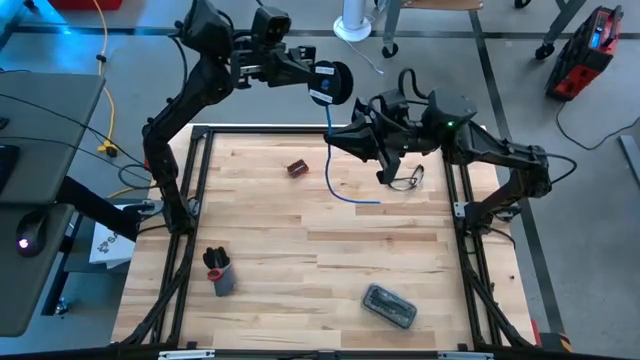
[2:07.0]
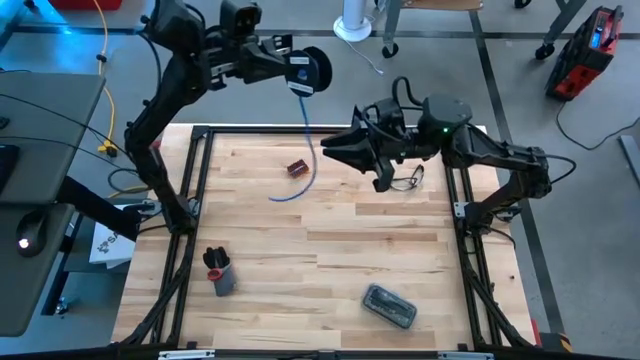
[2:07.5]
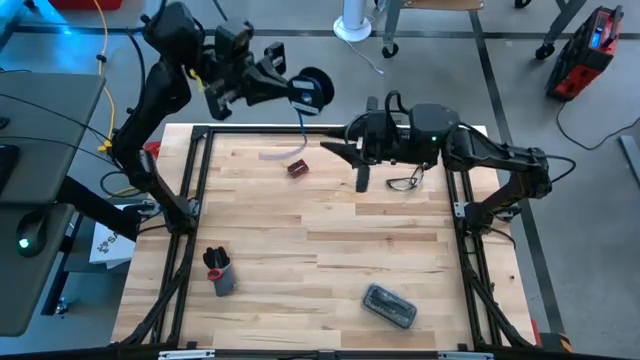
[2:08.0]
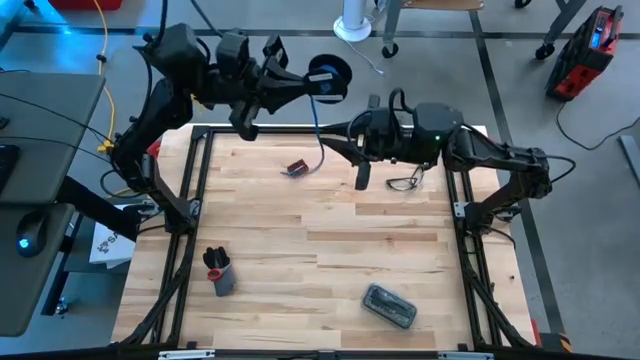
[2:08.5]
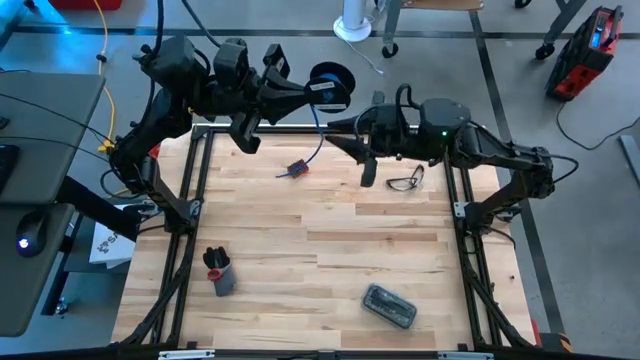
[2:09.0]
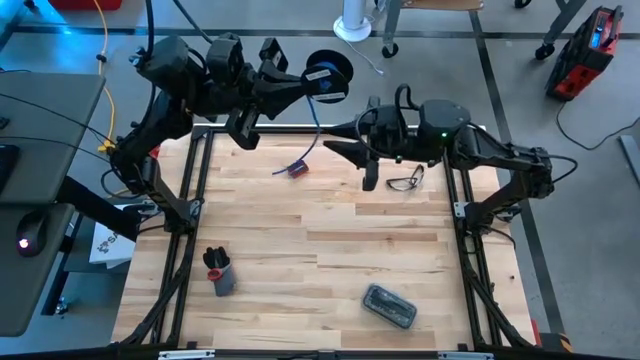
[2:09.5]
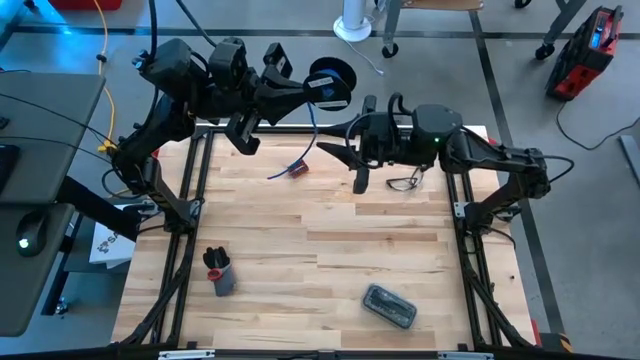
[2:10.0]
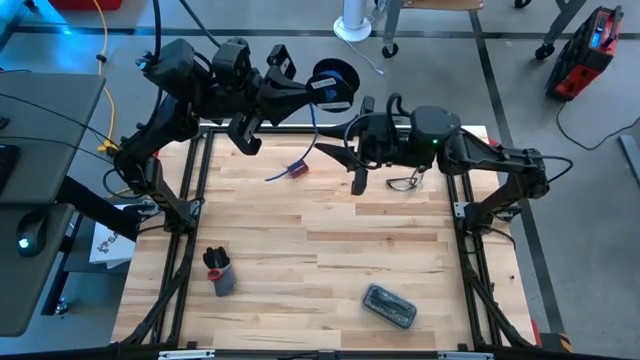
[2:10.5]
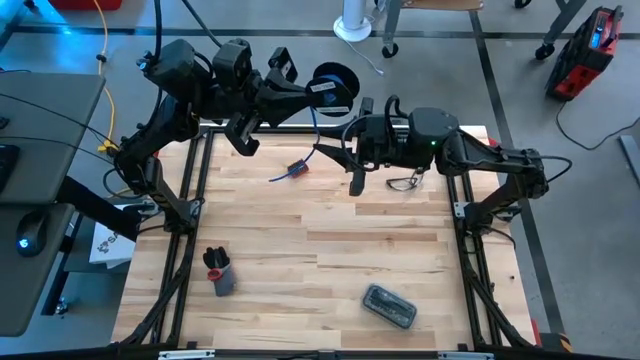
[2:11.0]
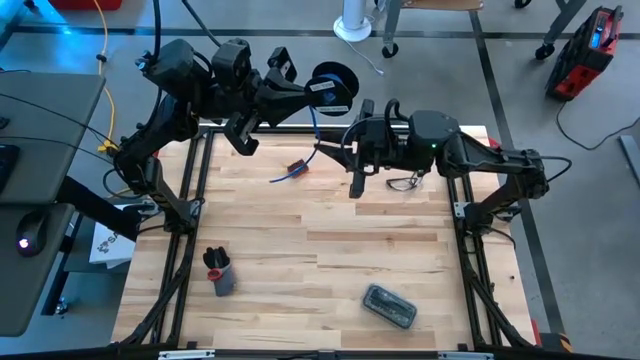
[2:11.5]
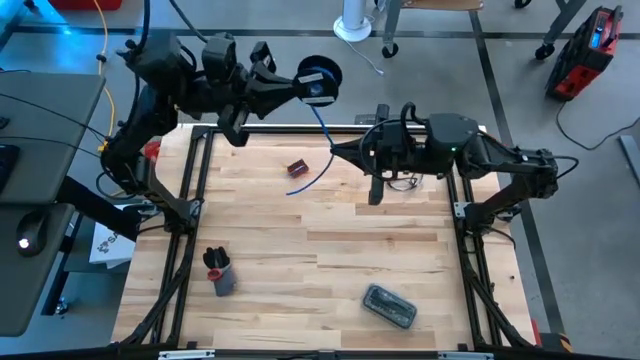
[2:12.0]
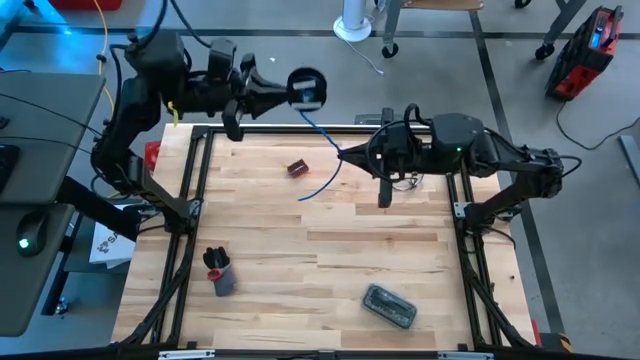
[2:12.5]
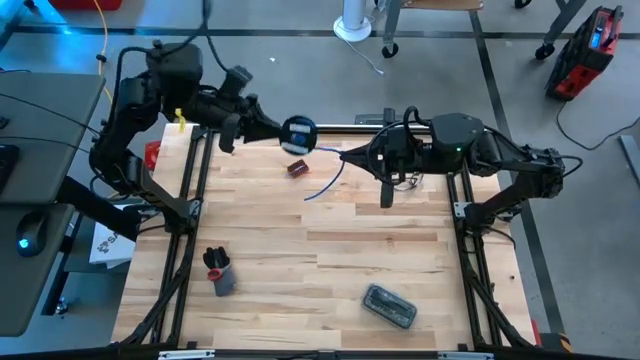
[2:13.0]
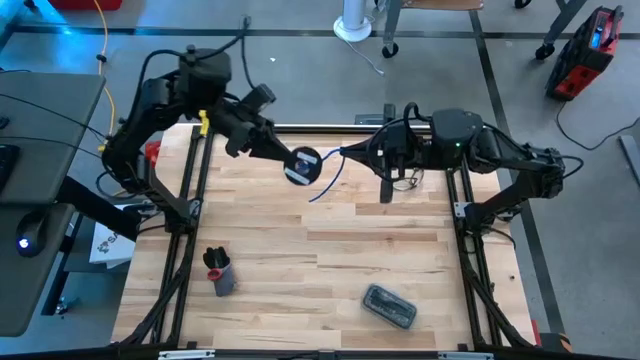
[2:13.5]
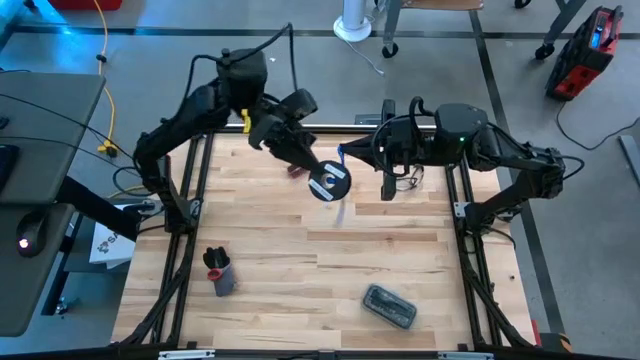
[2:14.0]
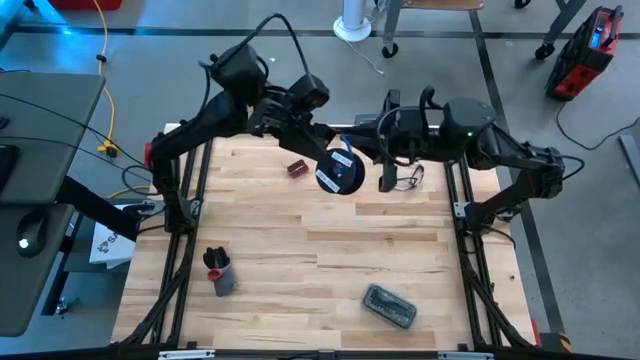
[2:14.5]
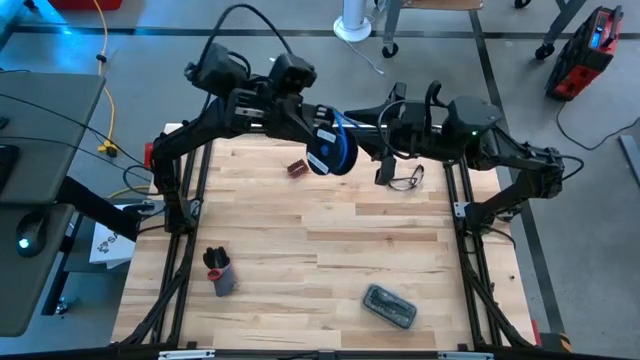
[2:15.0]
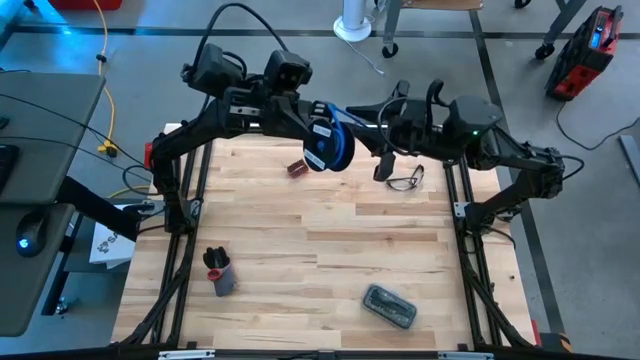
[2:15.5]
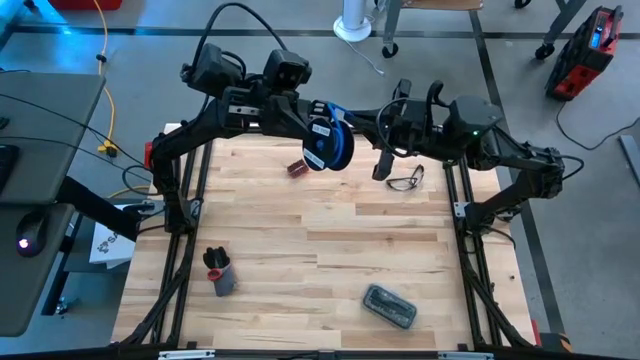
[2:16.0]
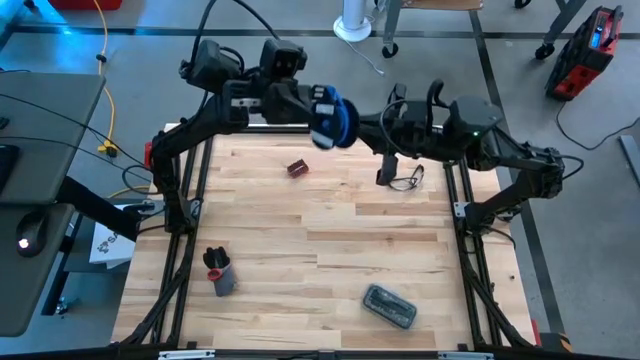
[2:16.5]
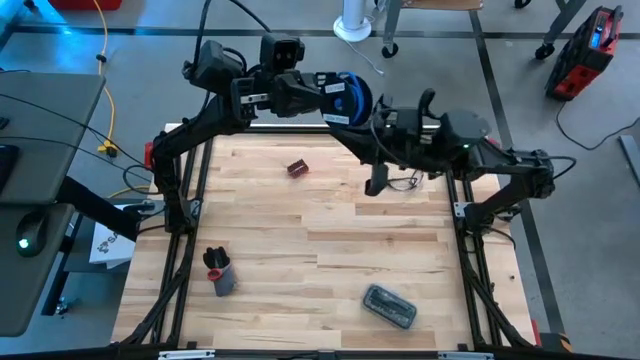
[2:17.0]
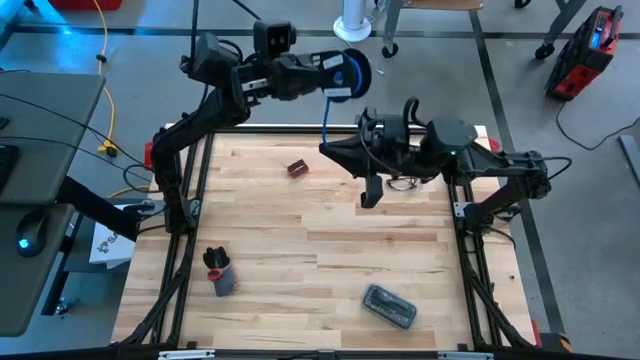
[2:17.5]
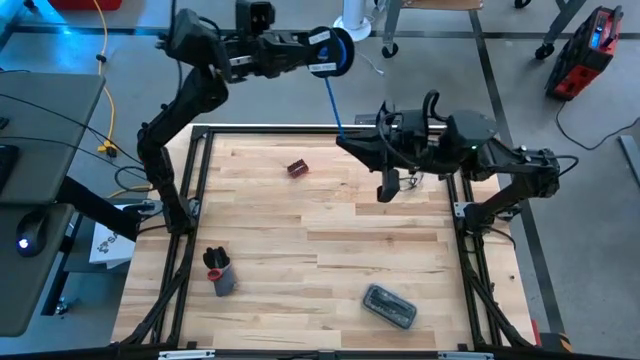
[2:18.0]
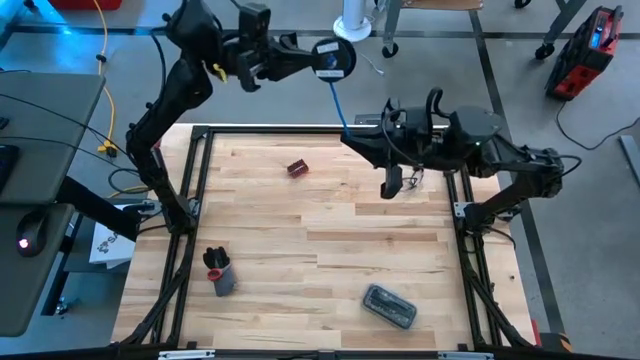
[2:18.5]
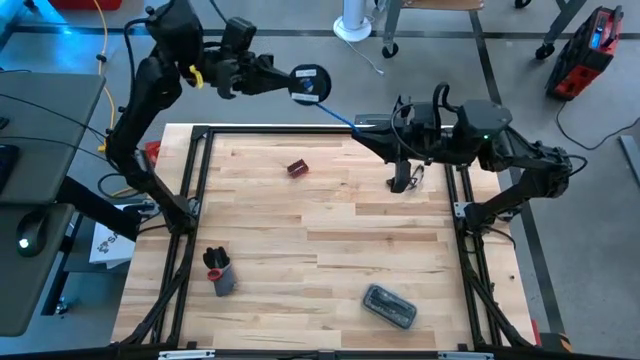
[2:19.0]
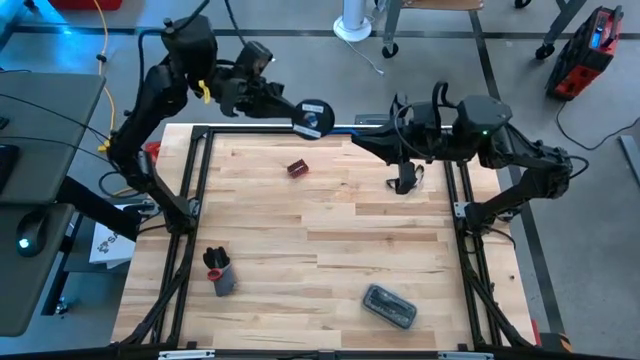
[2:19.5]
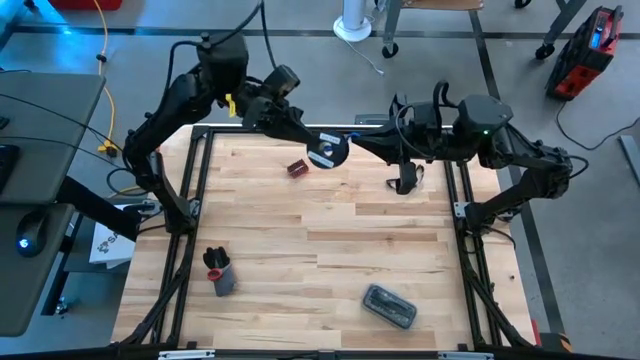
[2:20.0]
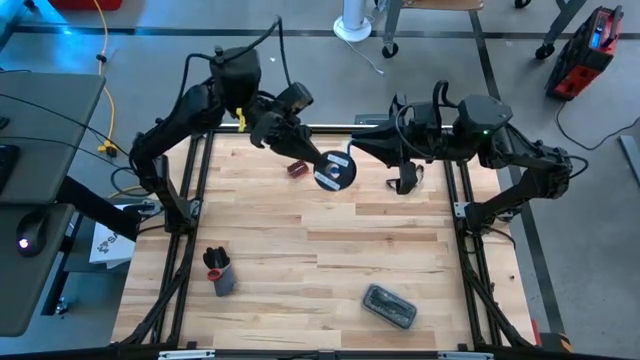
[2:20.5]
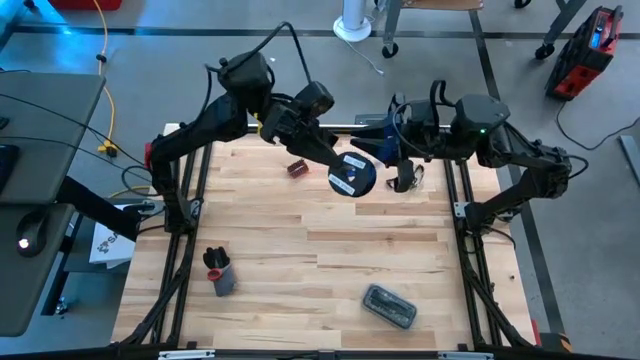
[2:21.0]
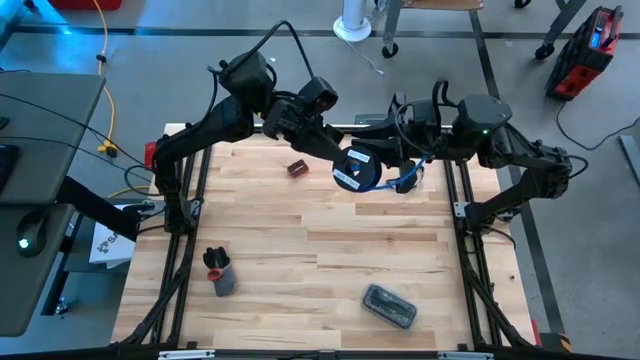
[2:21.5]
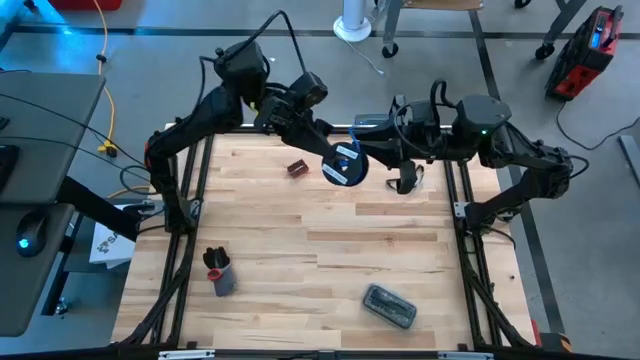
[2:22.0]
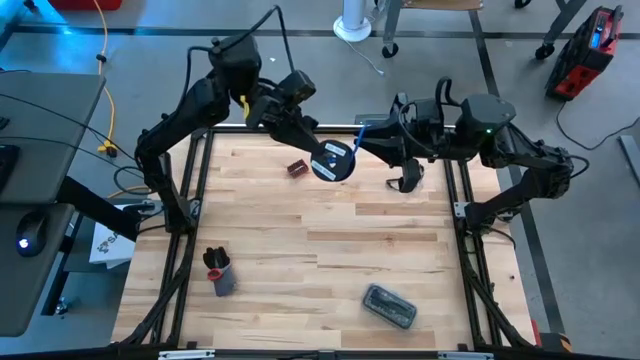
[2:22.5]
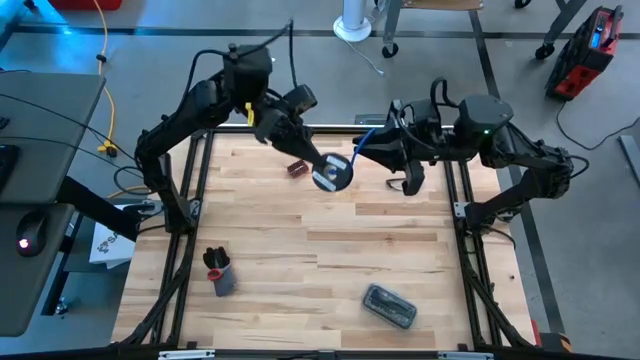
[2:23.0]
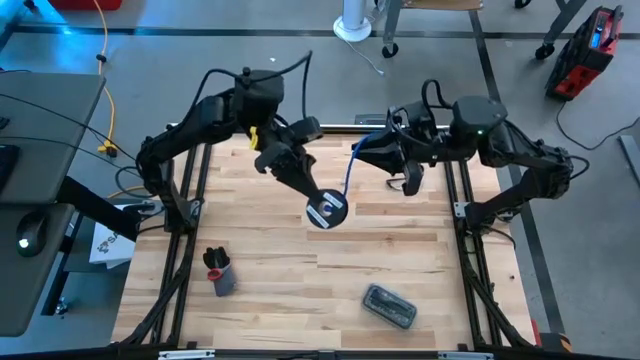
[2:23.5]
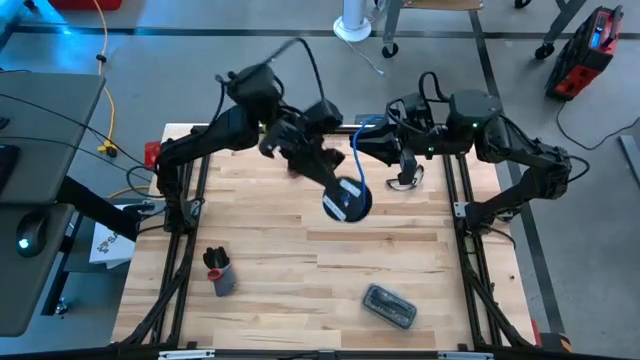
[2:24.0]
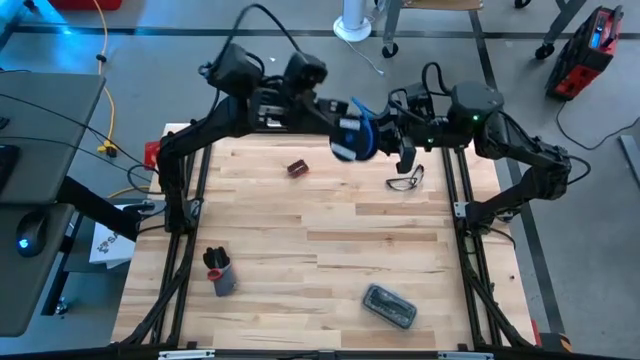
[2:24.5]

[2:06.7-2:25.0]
Task: Coil cords
Coil the blue wire onto the spool
